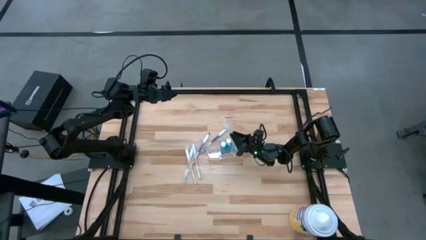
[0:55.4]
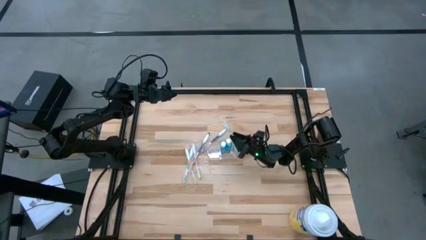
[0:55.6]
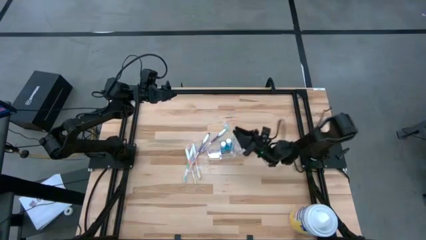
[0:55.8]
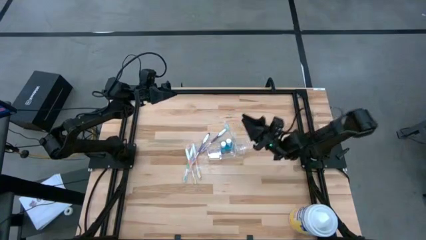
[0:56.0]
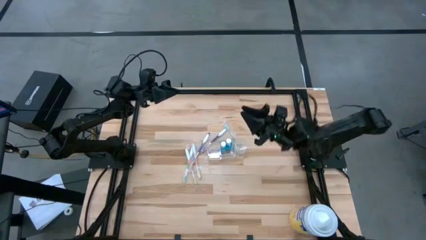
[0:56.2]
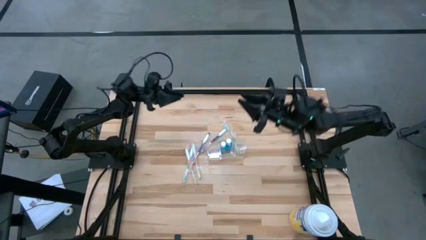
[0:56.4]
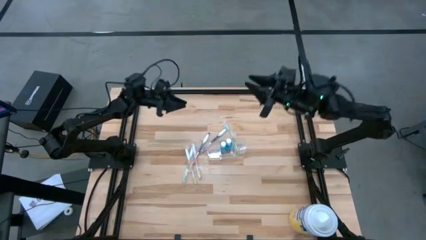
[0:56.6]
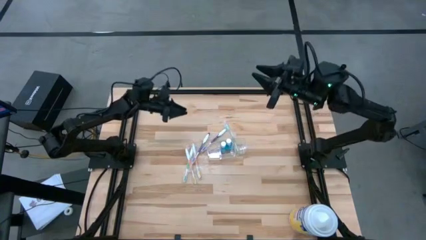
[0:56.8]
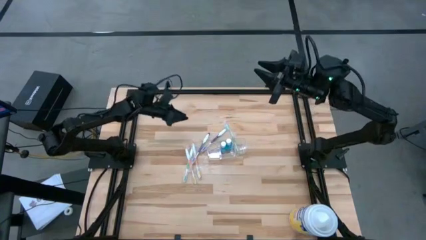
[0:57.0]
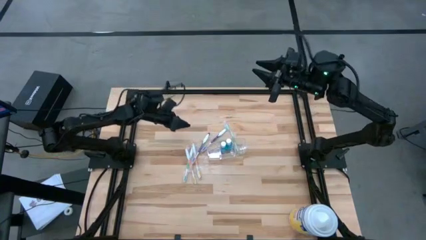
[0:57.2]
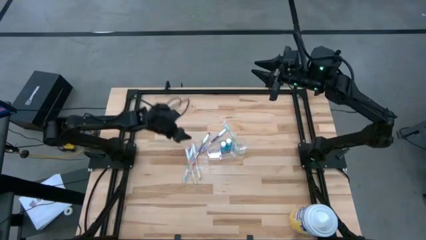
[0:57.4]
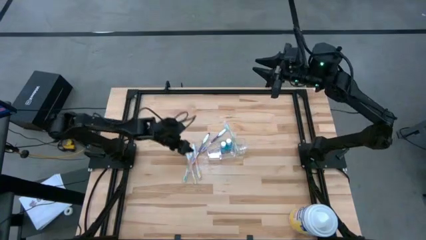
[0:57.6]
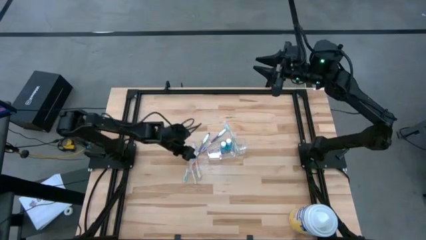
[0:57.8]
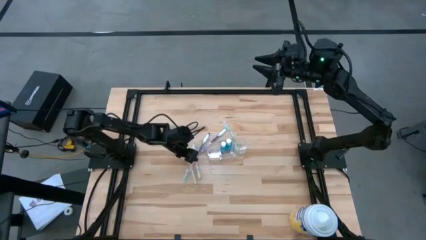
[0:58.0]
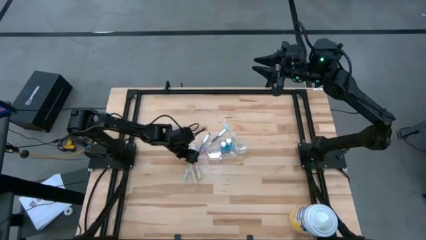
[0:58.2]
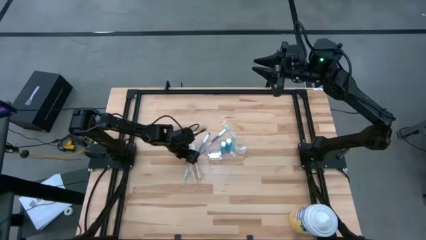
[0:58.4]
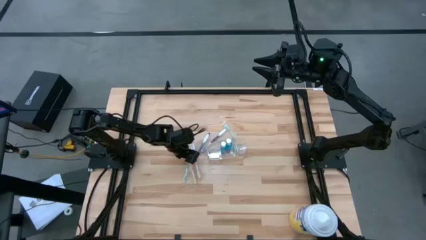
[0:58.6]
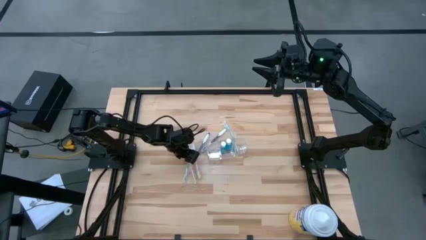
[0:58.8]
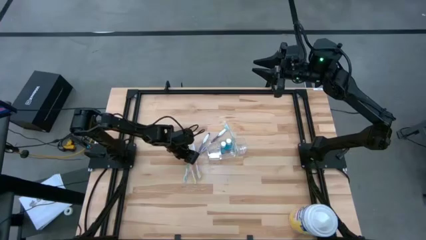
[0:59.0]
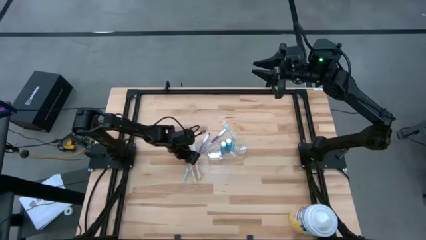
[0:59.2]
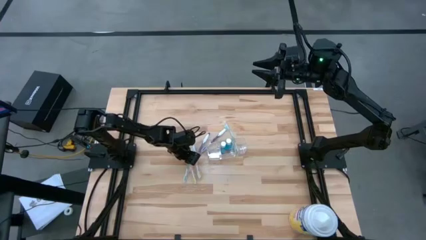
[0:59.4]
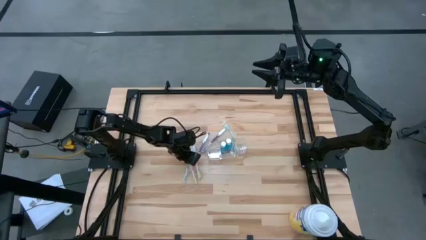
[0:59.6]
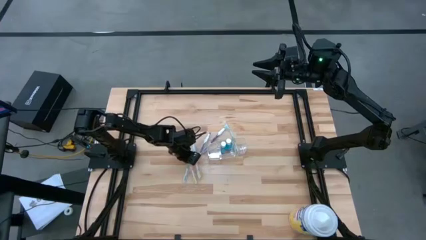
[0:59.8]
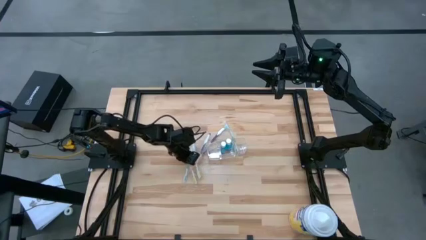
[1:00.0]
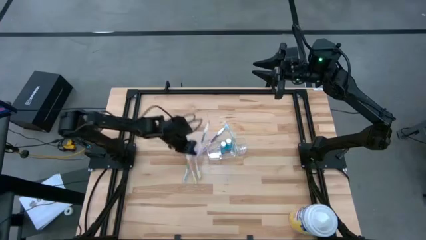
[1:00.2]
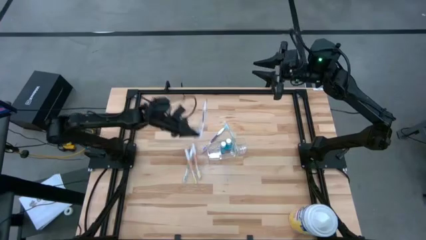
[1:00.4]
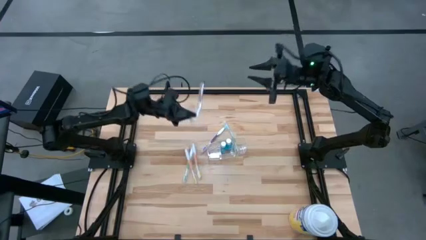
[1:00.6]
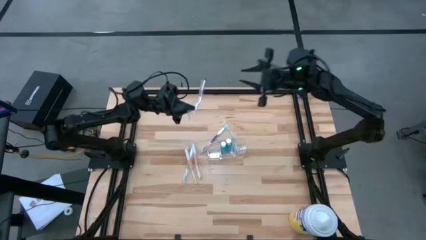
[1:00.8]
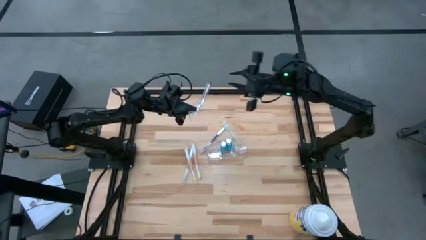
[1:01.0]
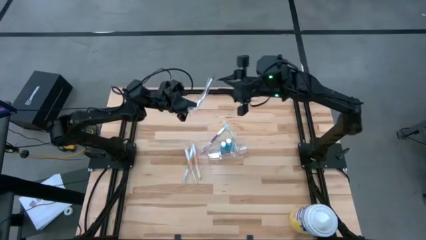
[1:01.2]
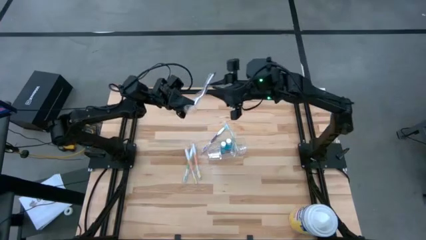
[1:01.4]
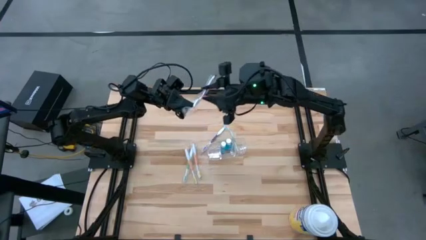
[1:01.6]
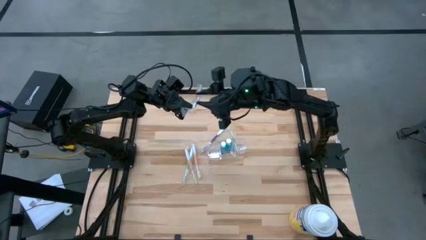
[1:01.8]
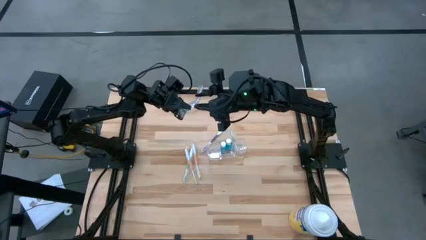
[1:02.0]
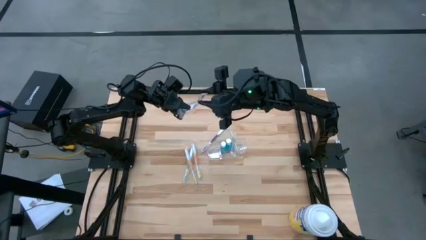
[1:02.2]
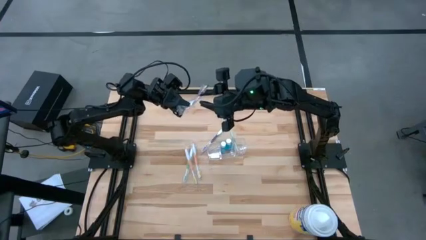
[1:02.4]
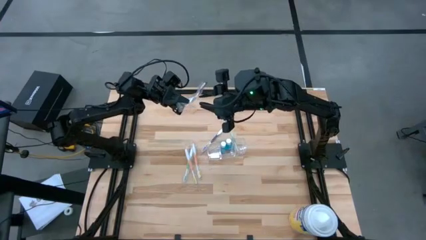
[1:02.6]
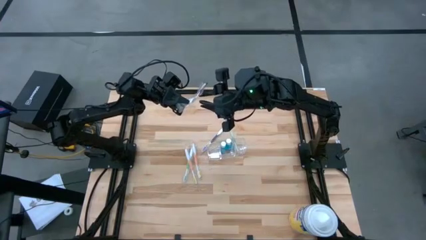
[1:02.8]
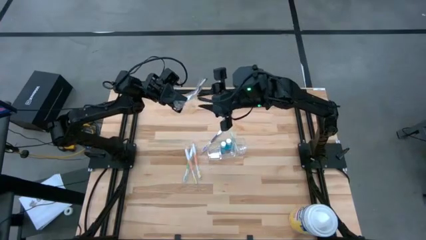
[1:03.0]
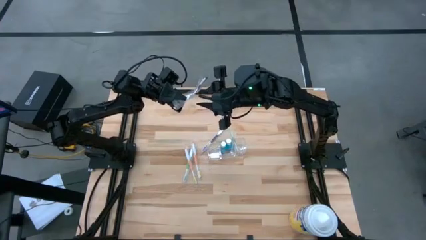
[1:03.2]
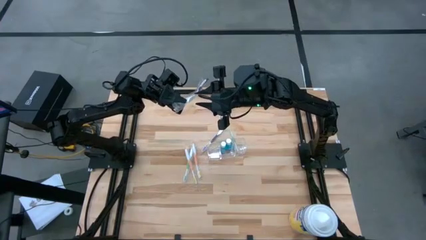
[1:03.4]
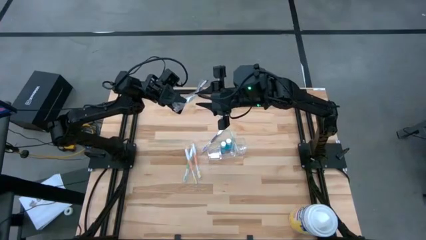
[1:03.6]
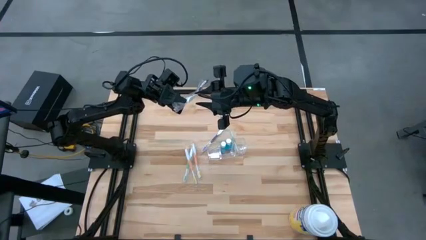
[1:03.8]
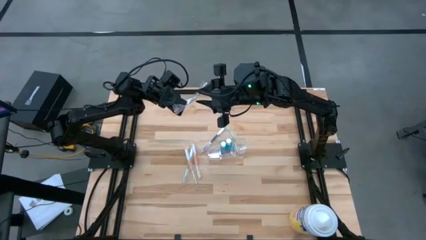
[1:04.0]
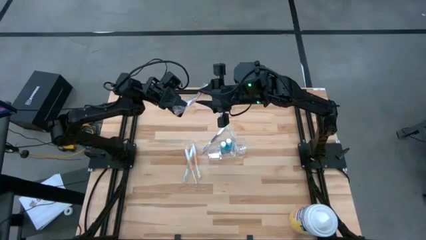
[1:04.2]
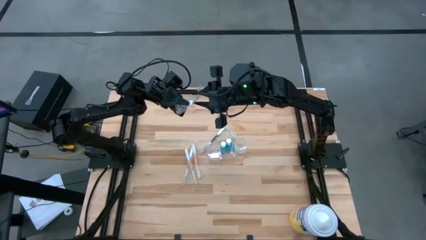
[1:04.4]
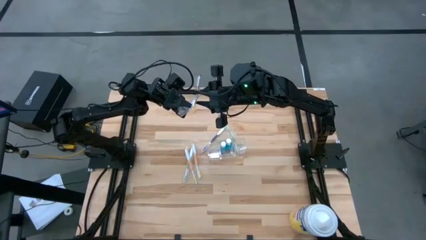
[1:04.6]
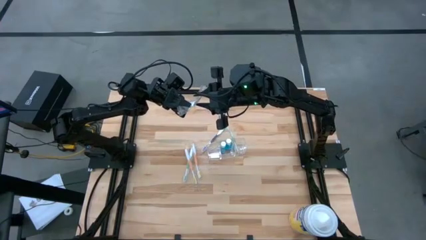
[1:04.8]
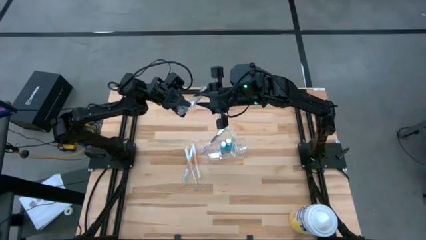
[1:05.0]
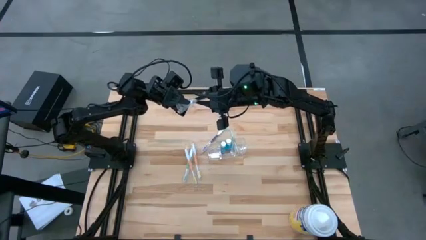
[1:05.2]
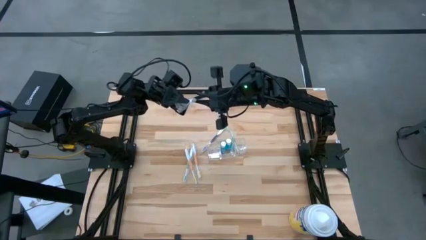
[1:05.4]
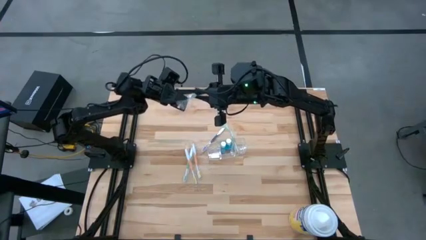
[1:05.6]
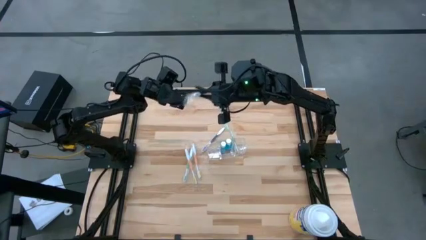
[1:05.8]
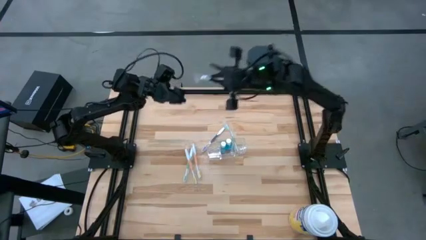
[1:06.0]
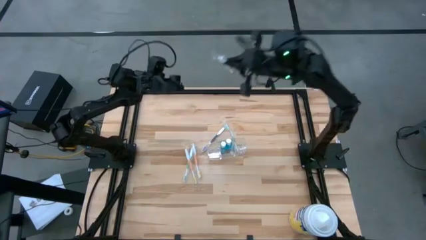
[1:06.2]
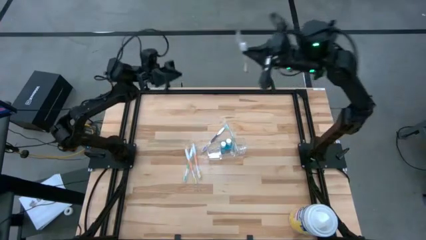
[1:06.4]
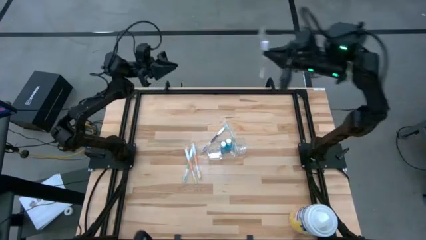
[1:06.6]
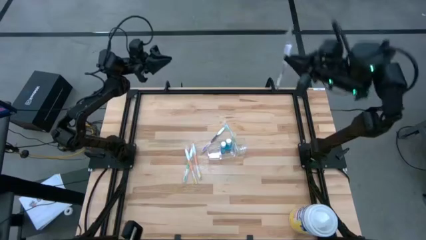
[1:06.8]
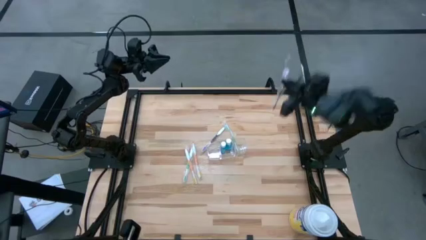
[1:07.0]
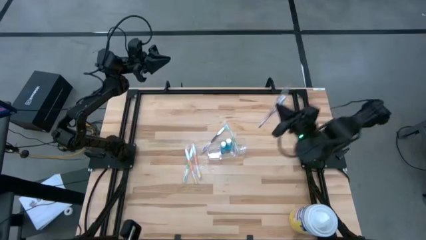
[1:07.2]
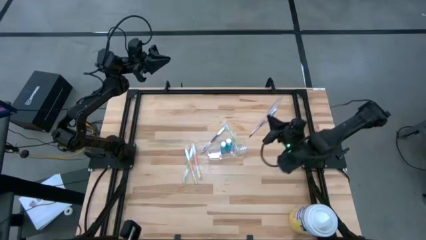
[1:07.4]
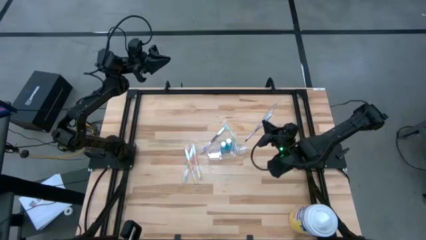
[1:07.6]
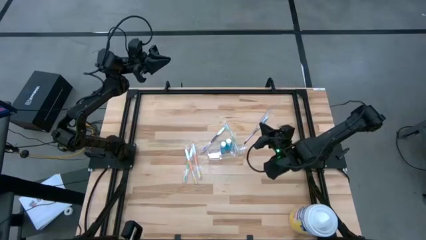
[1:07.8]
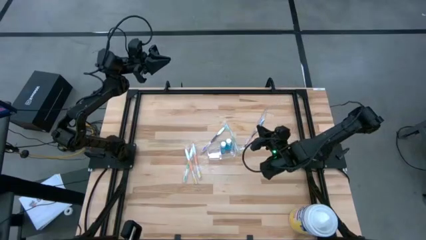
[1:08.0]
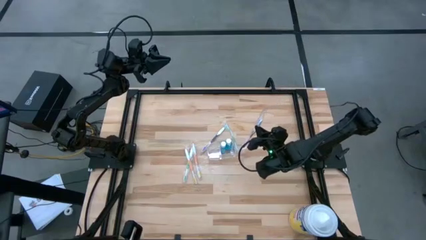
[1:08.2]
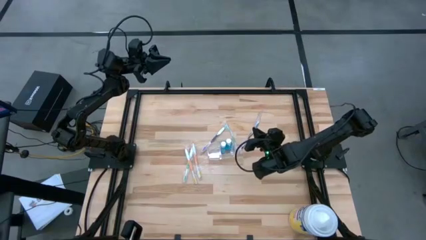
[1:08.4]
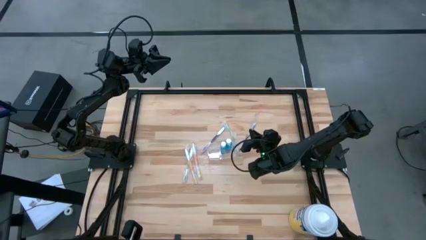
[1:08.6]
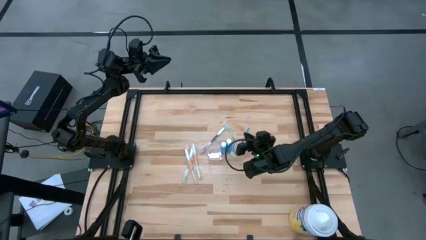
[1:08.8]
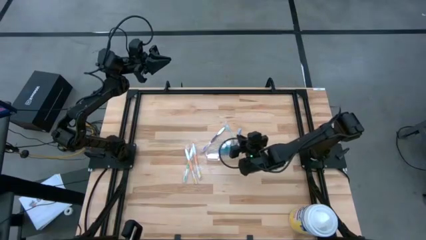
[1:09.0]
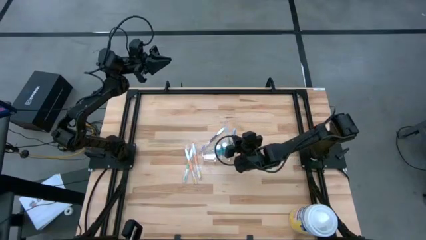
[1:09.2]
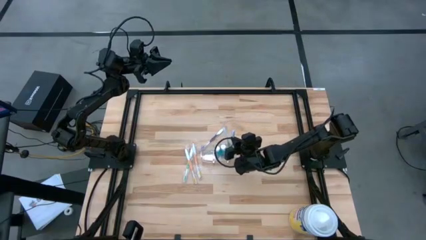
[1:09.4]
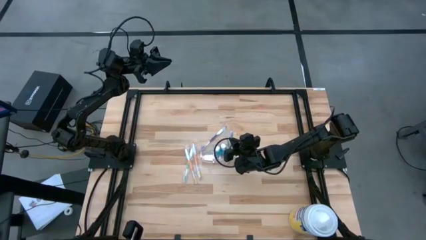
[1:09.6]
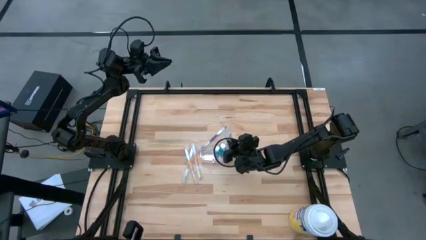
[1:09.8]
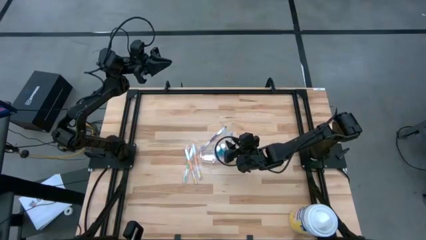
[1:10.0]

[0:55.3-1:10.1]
Task: Pick & Place toothbrushing station
Put the purple toothbrush into the transparent organizer
